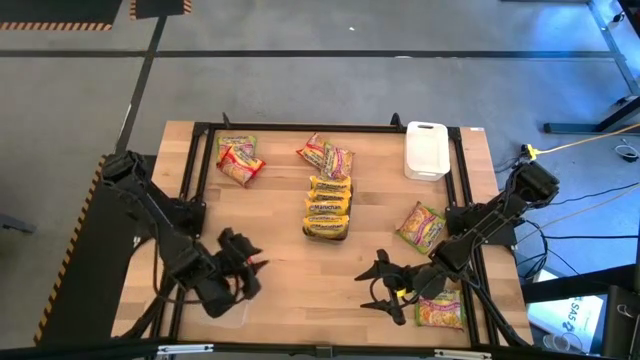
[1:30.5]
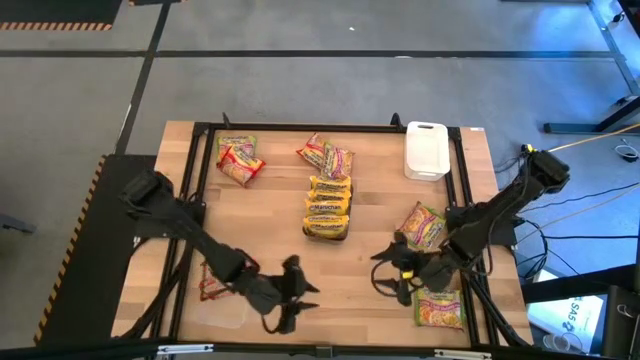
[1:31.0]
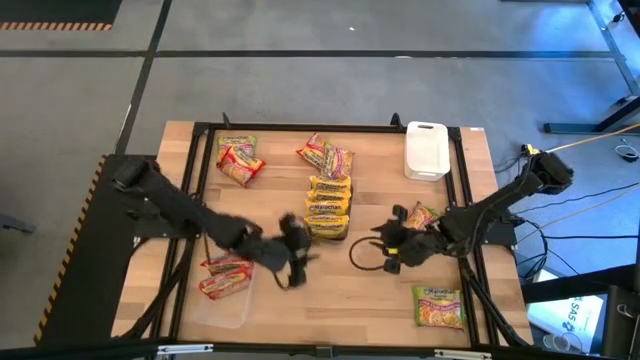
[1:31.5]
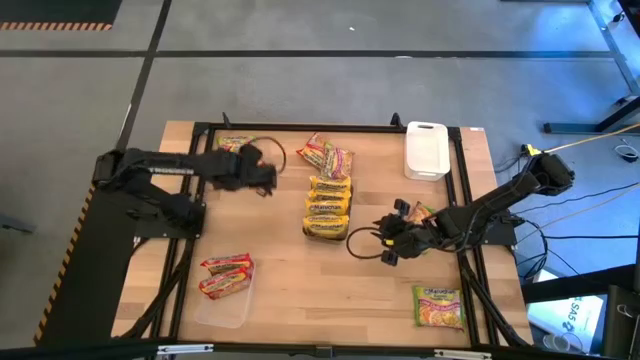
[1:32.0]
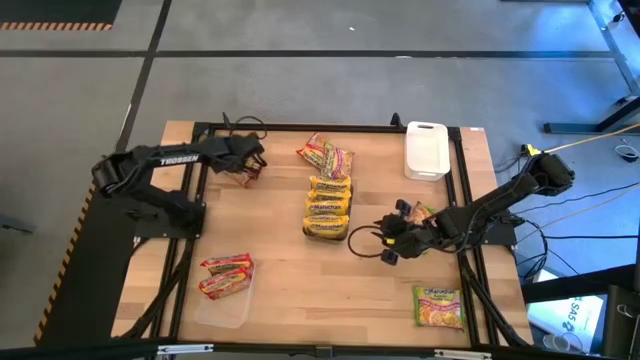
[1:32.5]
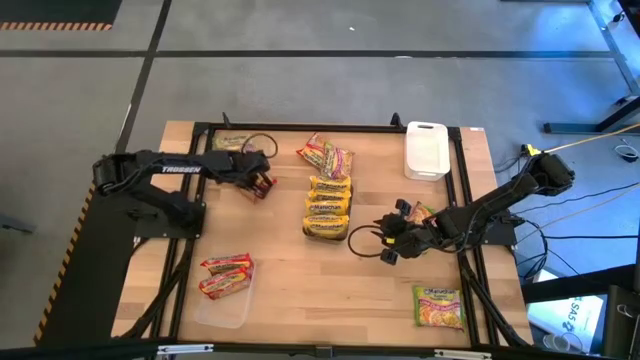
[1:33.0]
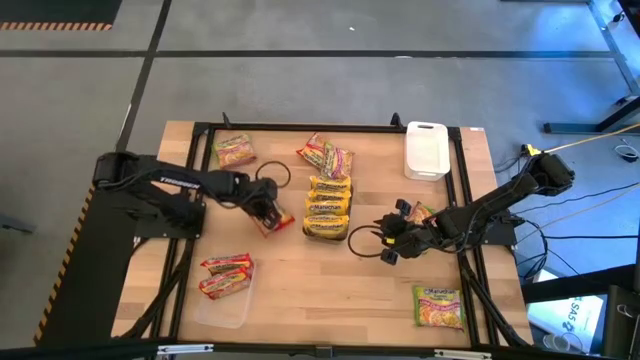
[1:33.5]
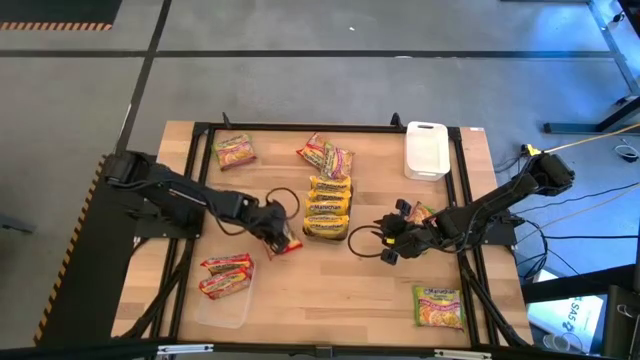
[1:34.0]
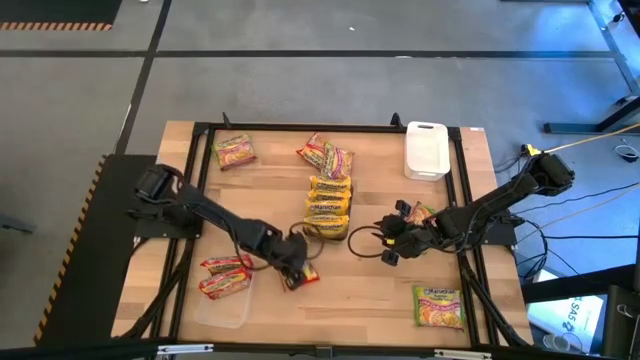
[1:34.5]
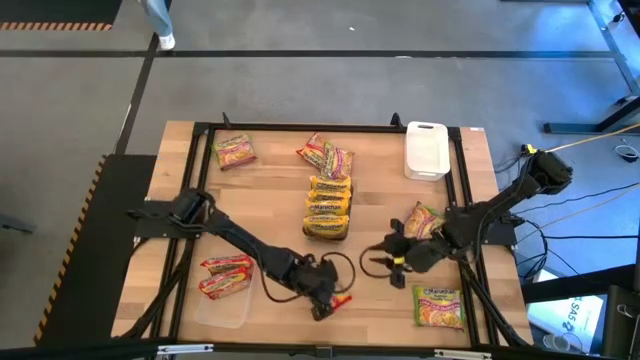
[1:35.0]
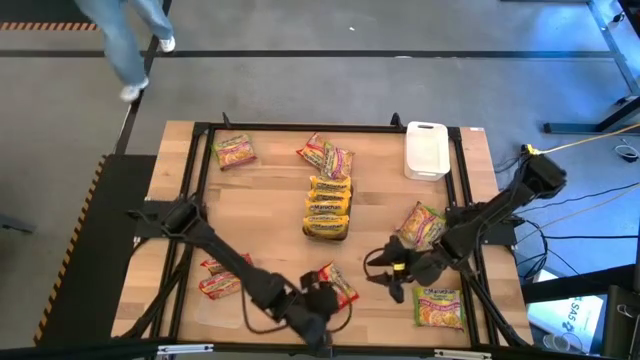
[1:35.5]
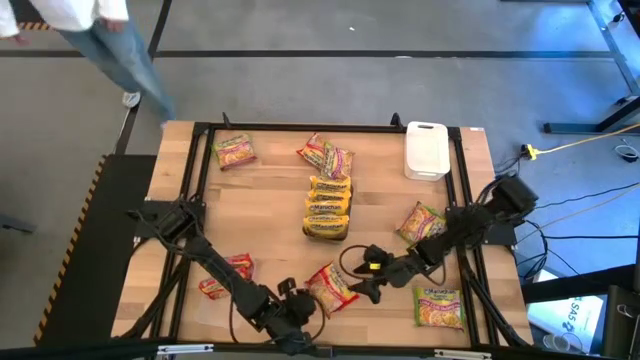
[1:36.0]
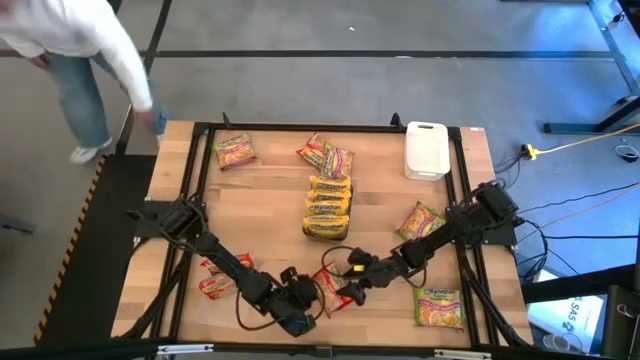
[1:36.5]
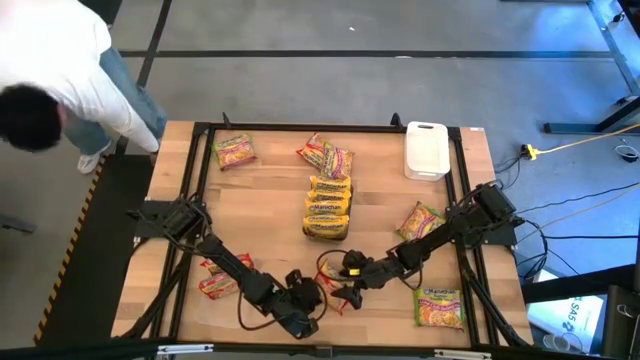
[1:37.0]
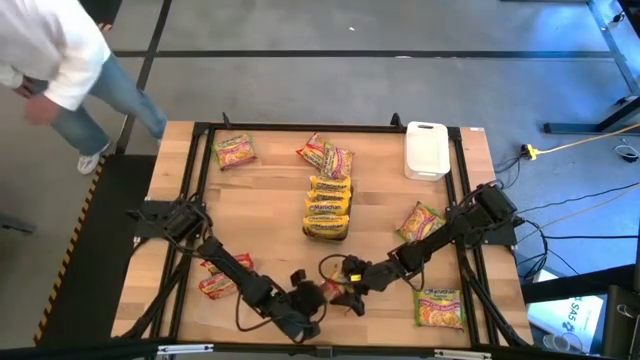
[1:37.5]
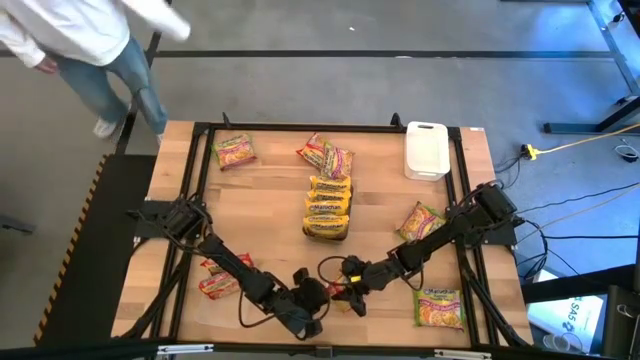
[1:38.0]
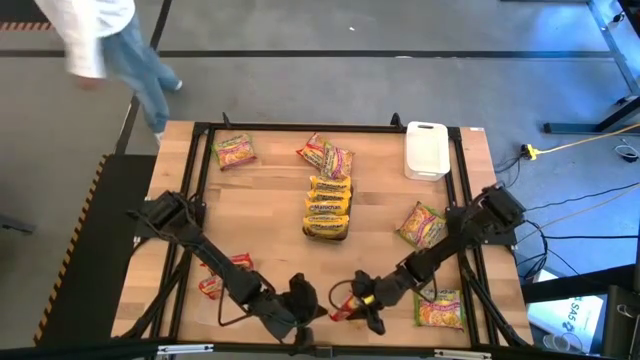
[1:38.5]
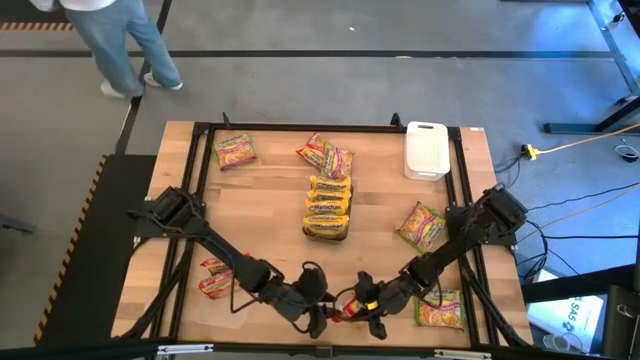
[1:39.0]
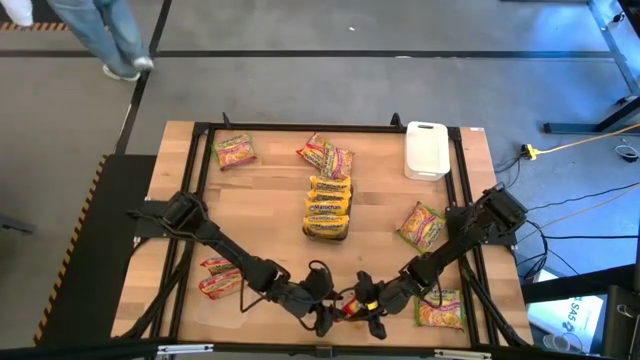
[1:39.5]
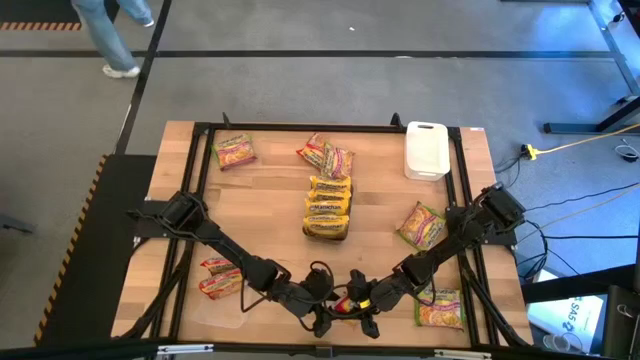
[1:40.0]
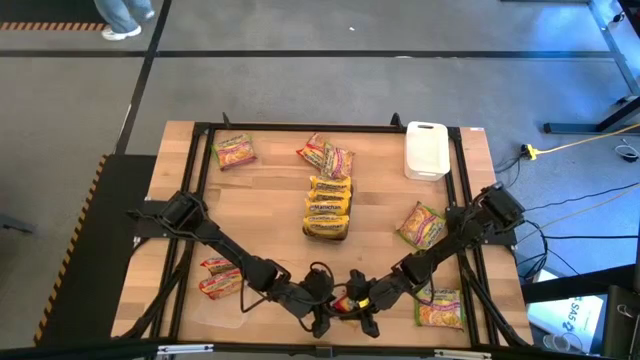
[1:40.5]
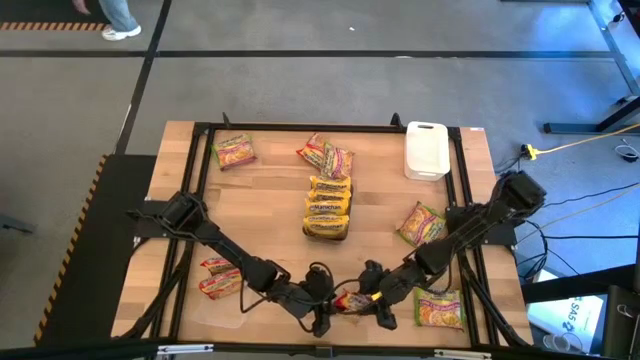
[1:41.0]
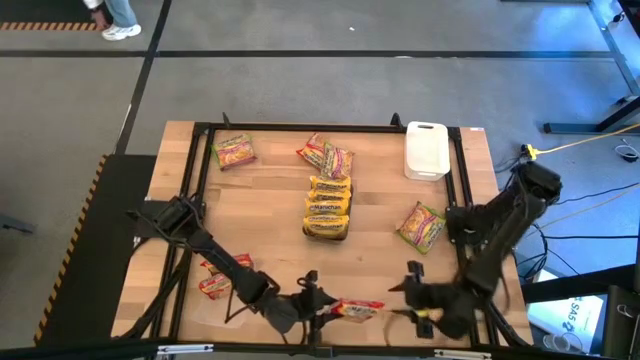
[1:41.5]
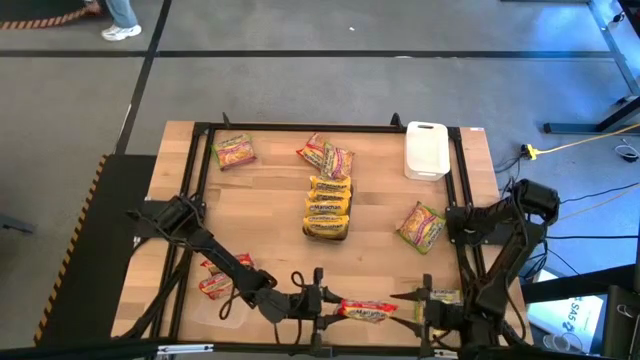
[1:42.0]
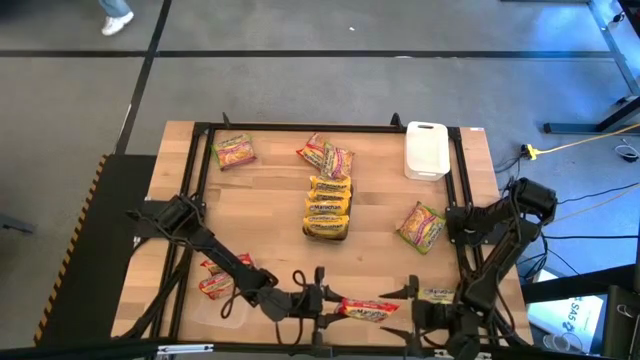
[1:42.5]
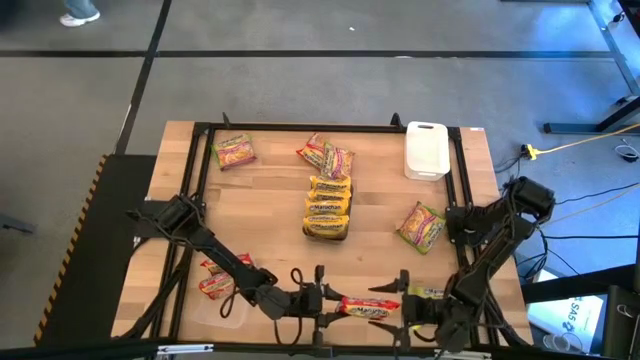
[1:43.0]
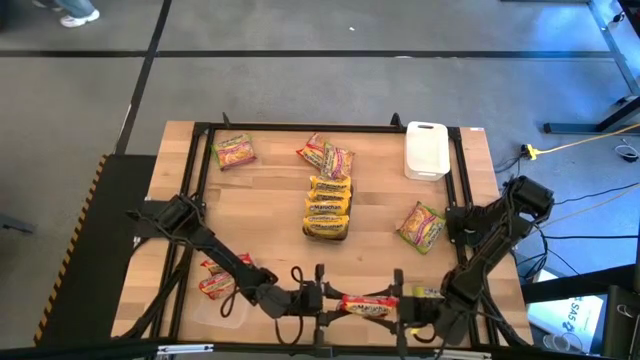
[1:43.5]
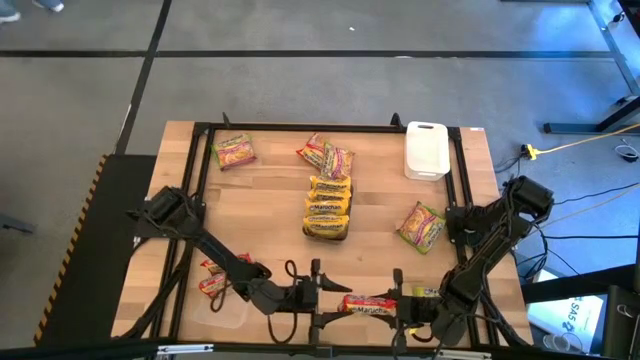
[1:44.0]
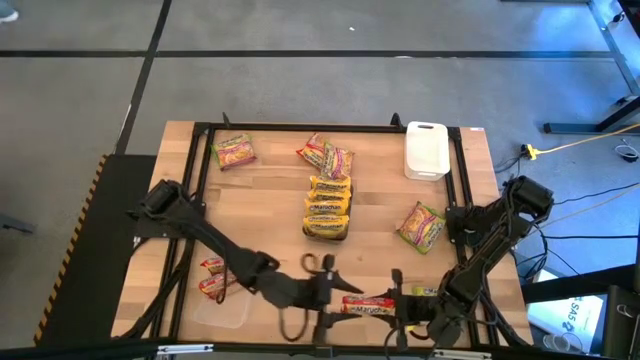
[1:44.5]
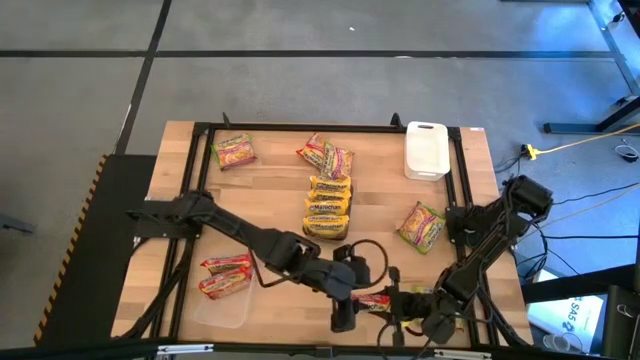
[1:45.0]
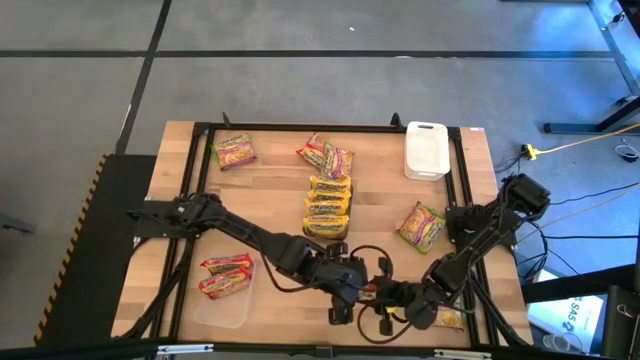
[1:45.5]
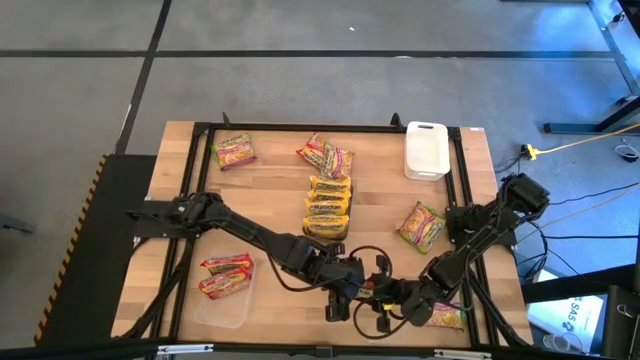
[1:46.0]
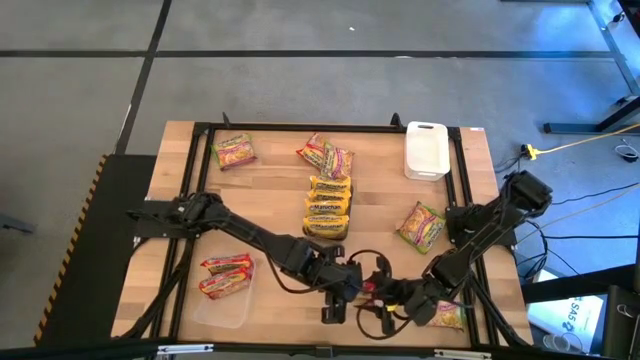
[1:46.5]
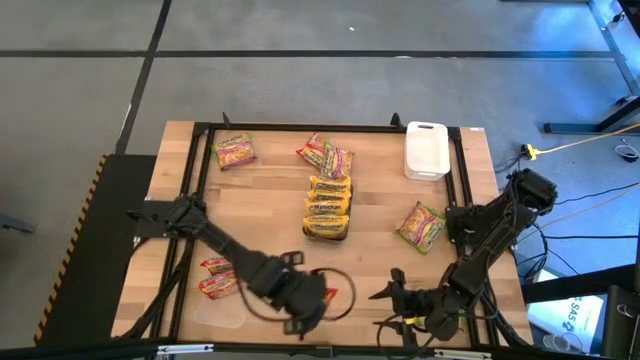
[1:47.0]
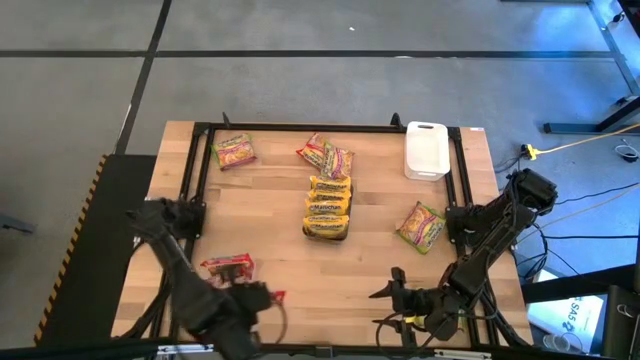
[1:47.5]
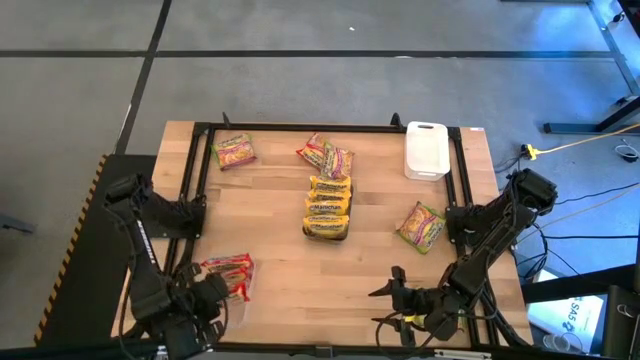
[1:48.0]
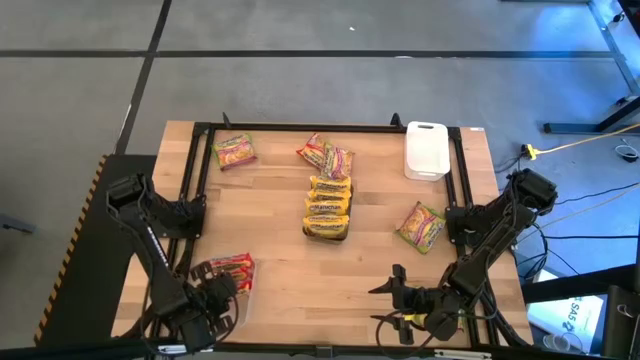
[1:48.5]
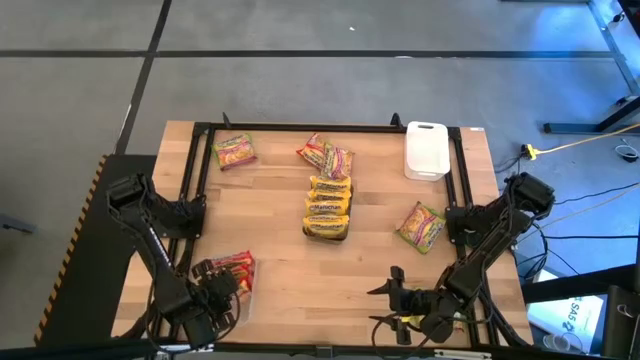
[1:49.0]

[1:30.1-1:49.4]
Task: Sort Maruchan noodles
Put the red noodle pack into the transparent bin

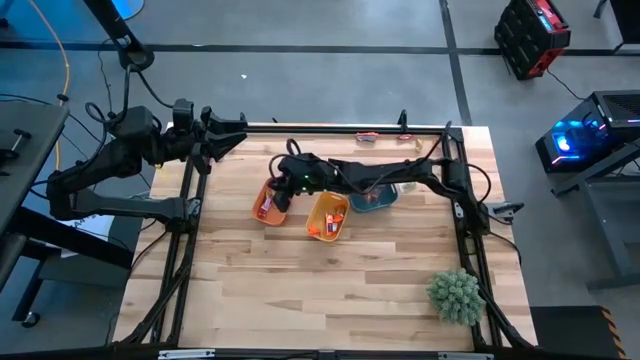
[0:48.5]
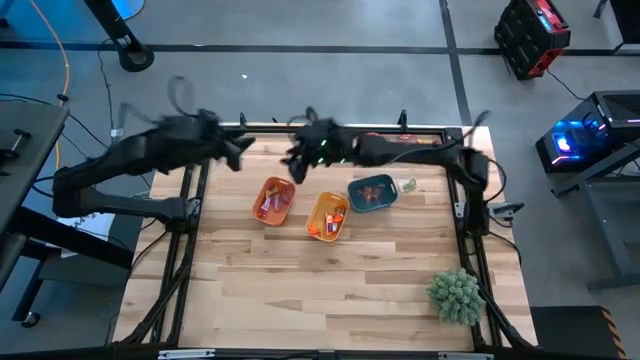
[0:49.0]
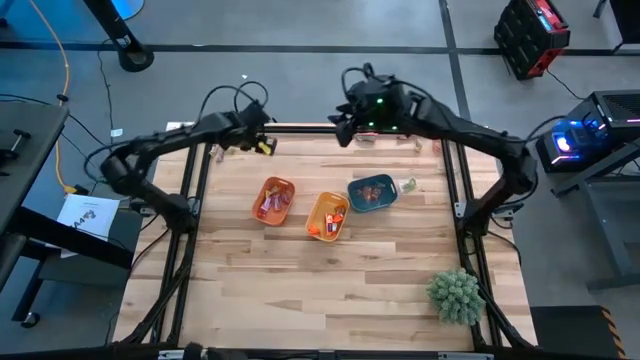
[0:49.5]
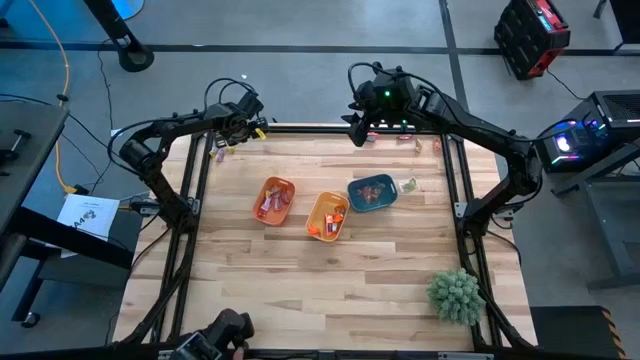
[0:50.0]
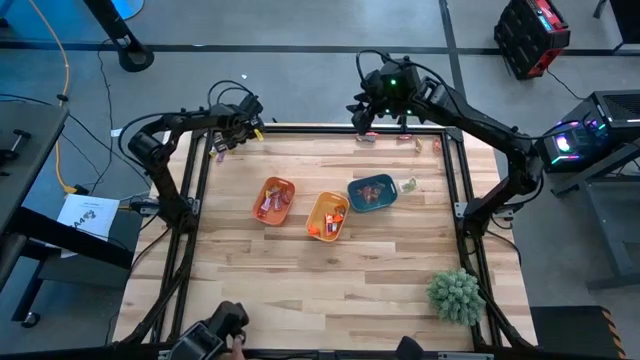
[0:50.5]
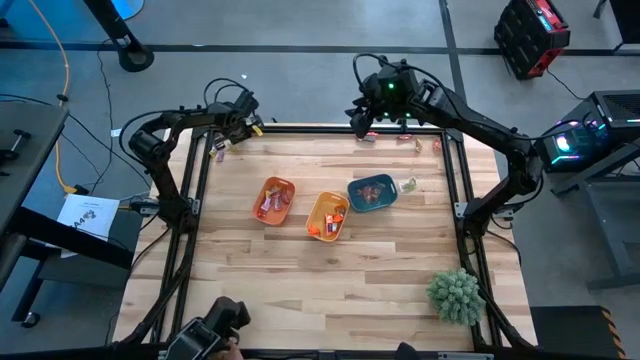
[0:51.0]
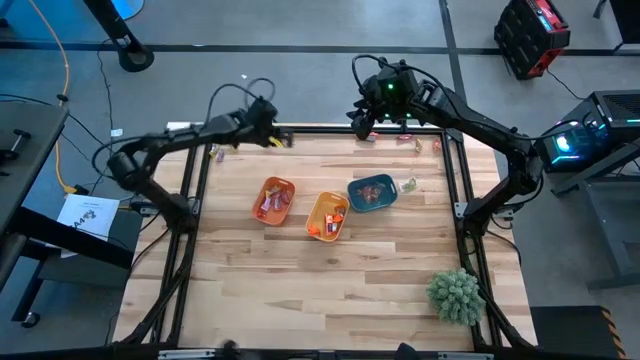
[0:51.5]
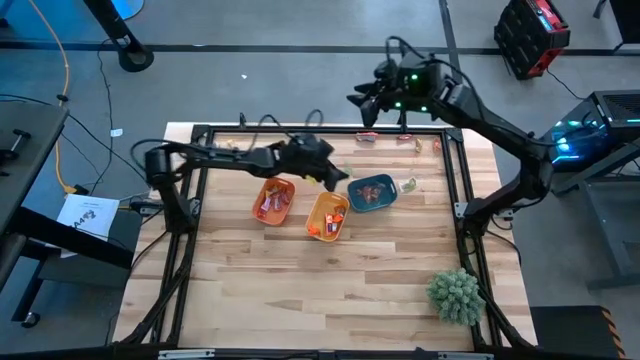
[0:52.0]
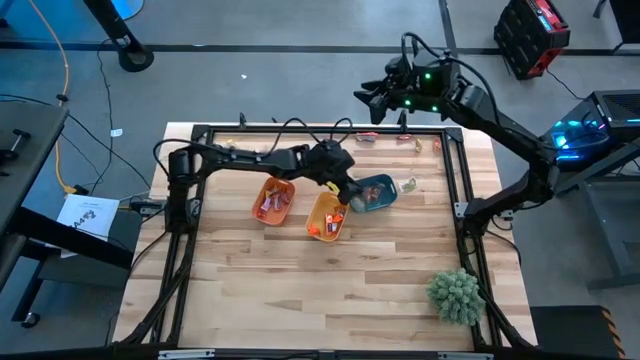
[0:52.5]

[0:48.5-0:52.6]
Task: Sort candy
Put the green gummy into the blue bin
